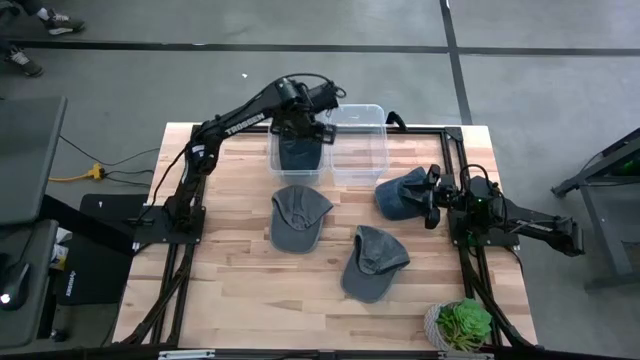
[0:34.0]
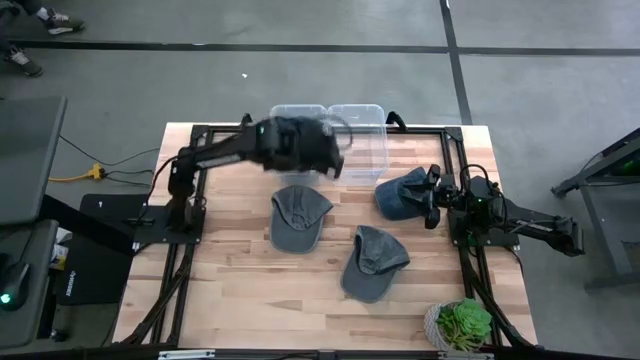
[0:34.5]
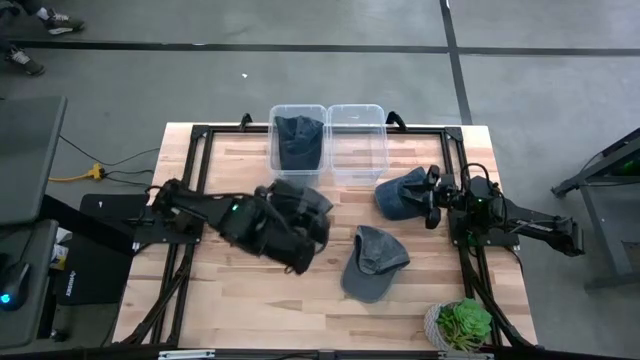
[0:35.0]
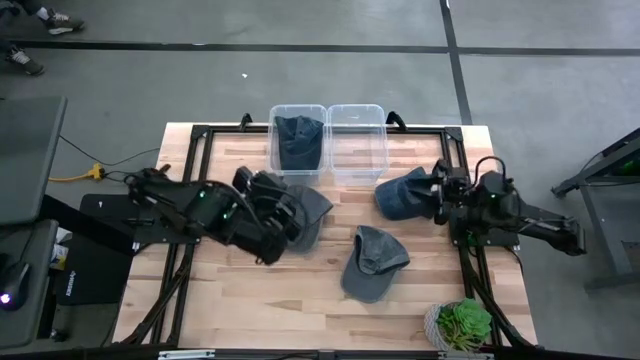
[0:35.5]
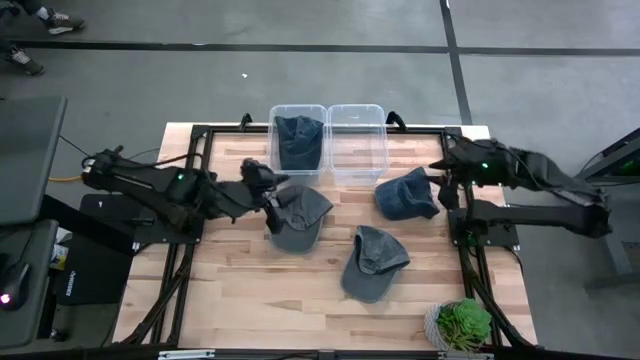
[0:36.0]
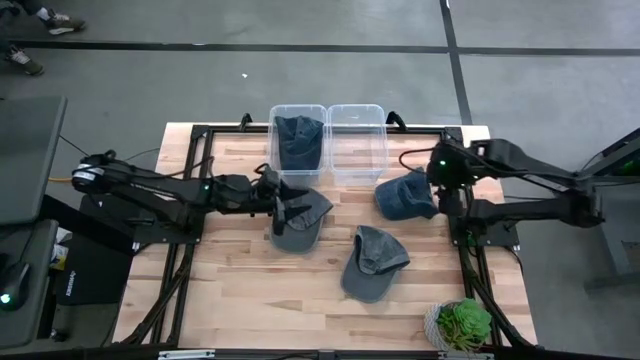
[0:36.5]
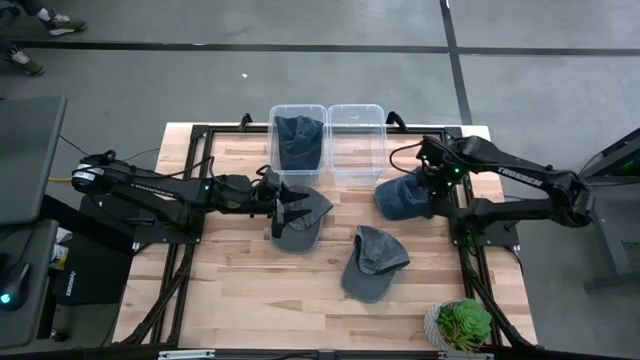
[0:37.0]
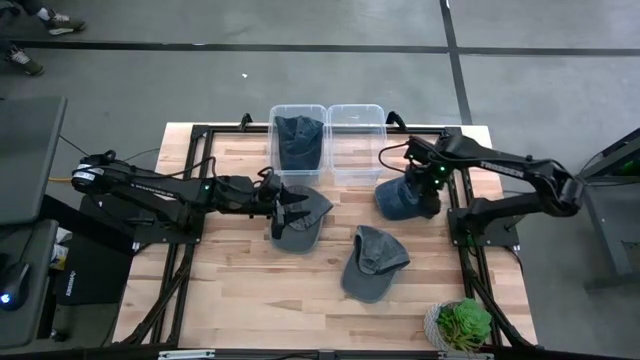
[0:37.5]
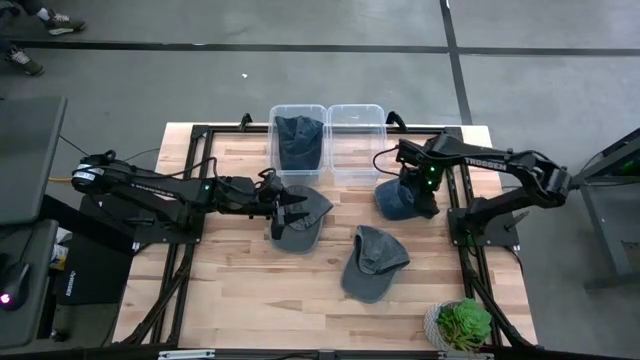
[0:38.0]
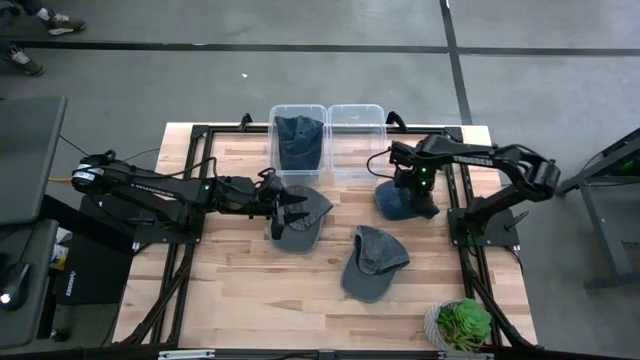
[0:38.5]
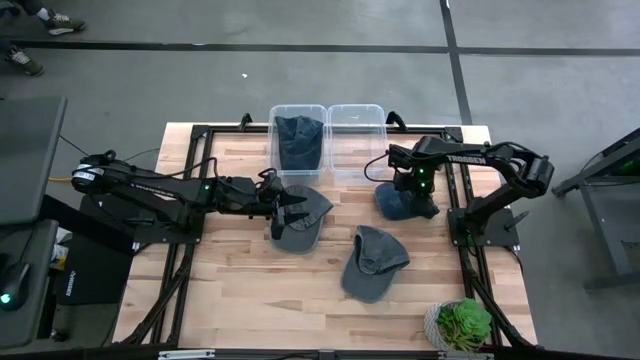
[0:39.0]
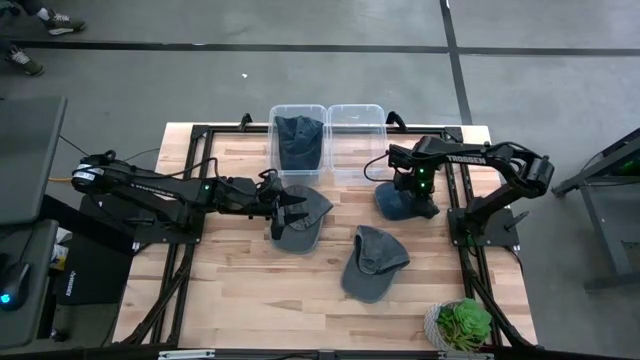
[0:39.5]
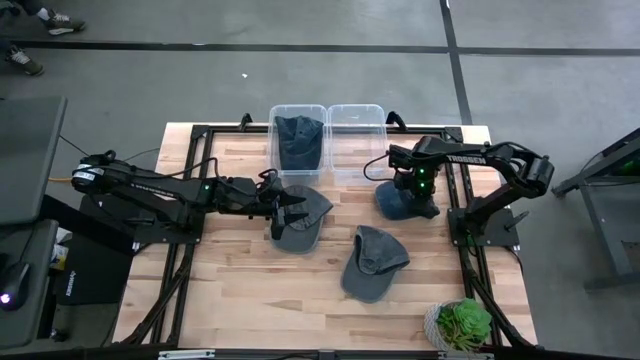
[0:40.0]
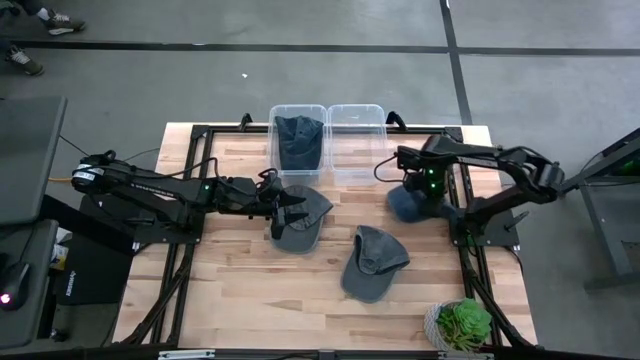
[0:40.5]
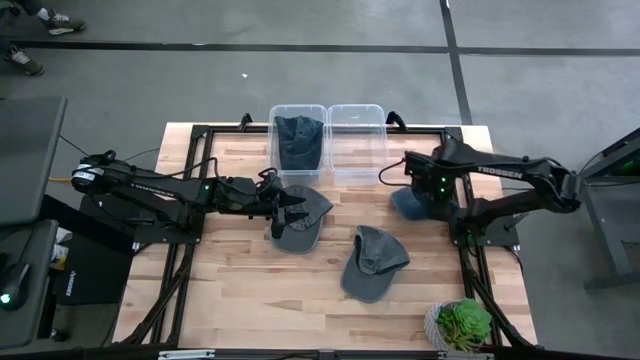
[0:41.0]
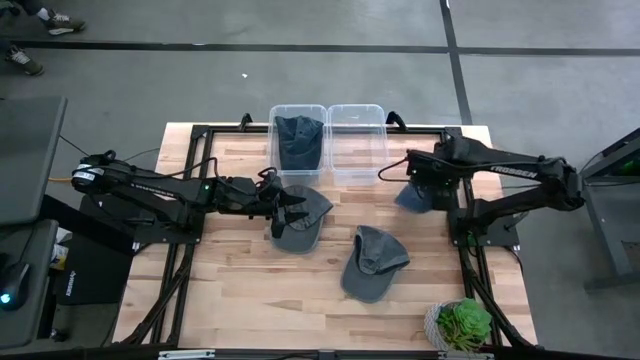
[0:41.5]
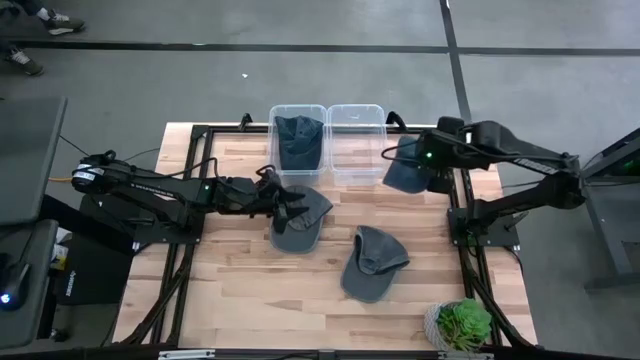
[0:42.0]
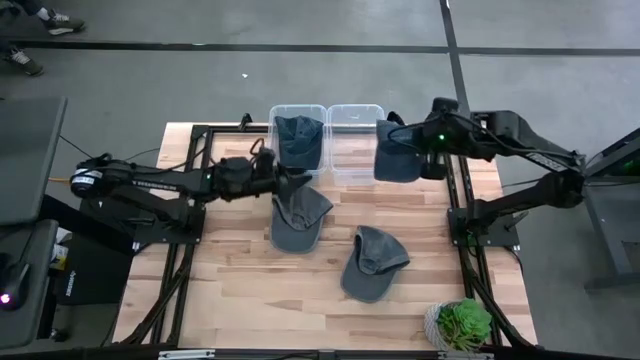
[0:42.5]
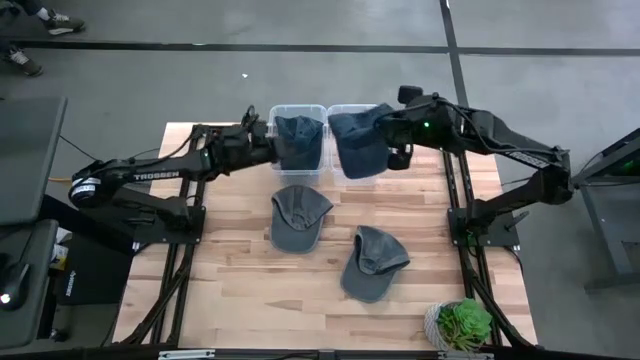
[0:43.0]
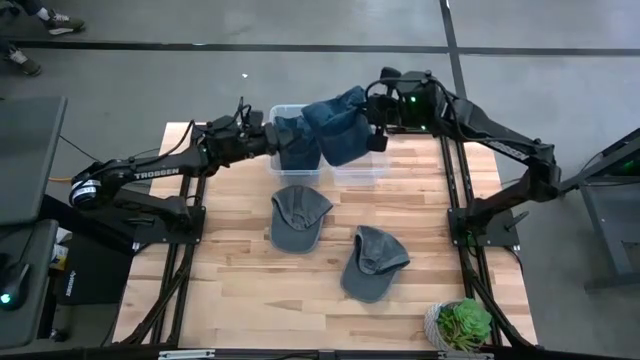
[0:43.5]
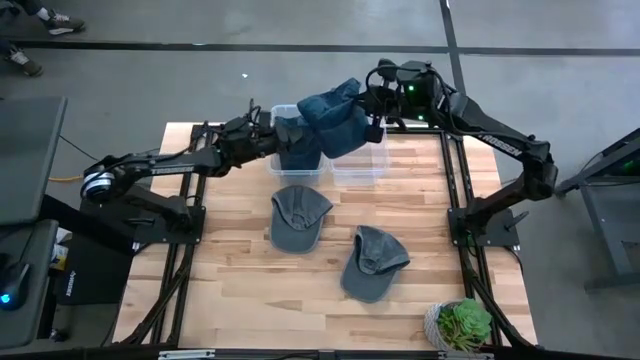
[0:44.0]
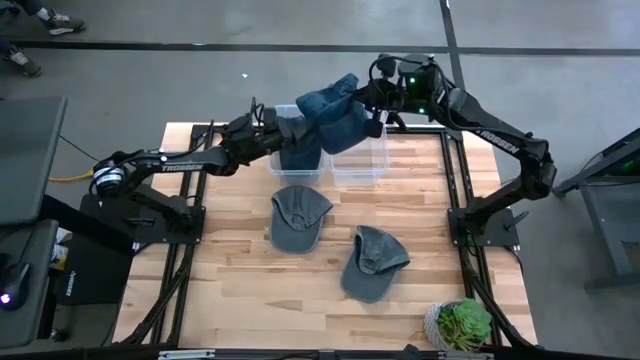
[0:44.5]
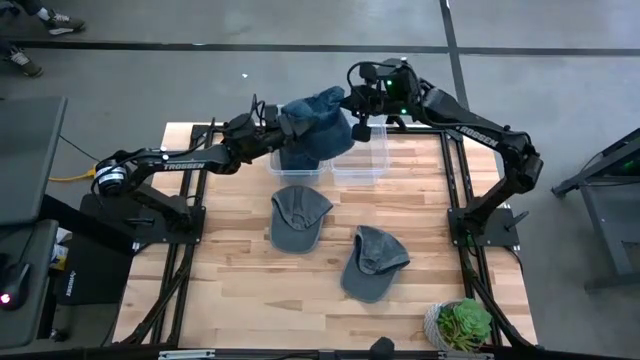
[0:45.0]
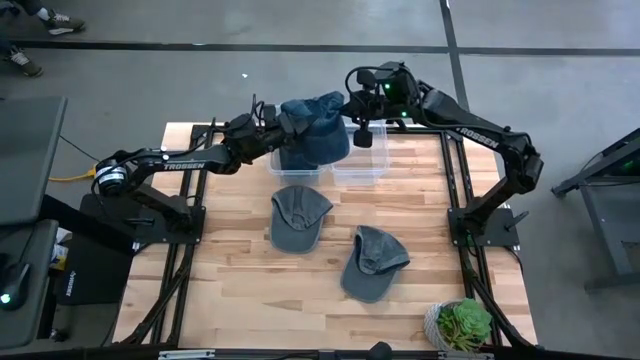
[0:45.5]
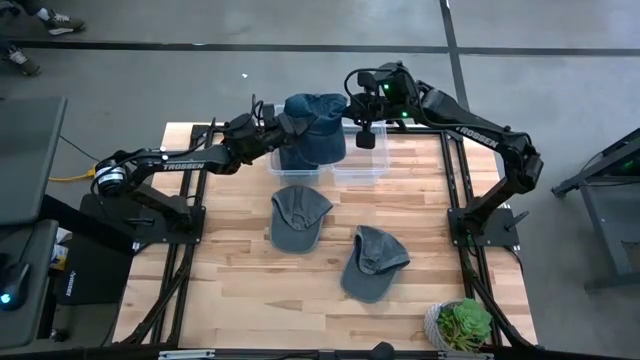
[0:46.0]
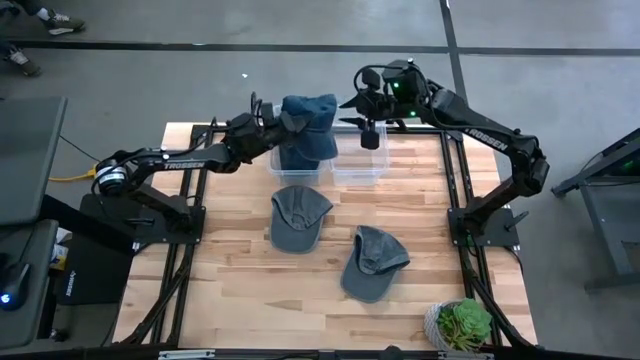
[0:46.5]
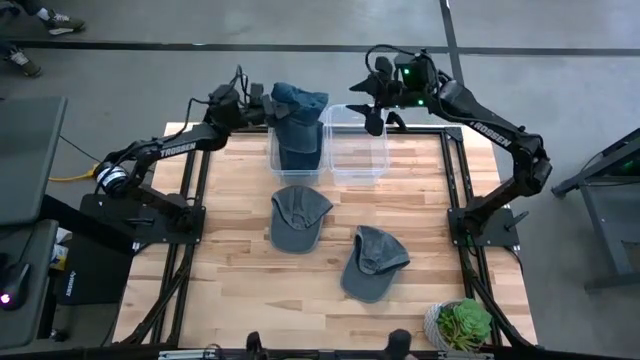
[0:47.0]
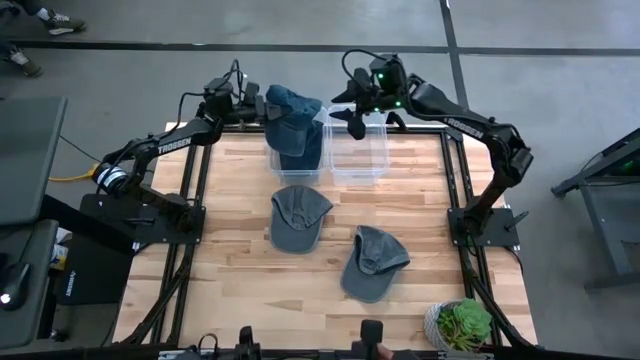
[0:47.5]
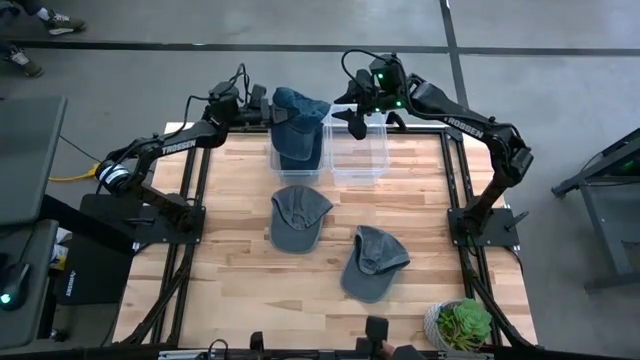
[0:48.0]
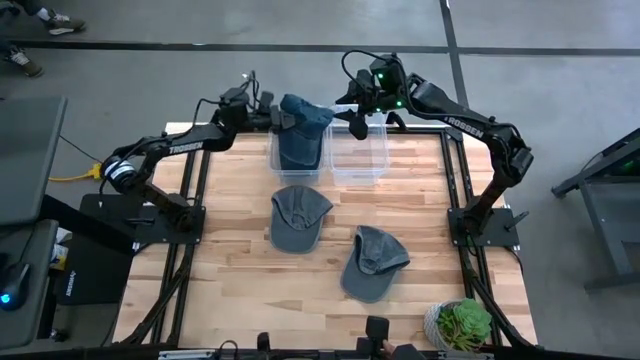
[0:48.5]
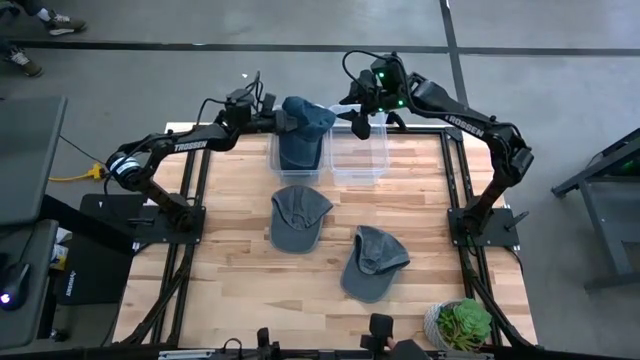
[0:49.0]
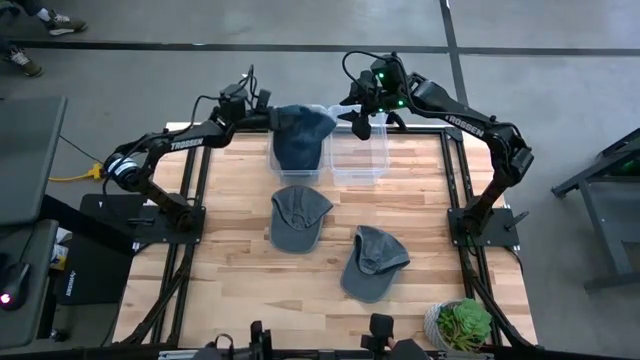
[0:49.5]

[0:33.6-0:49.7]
Task: Pick & Place hat
Put the blue cap into the left transparent bin

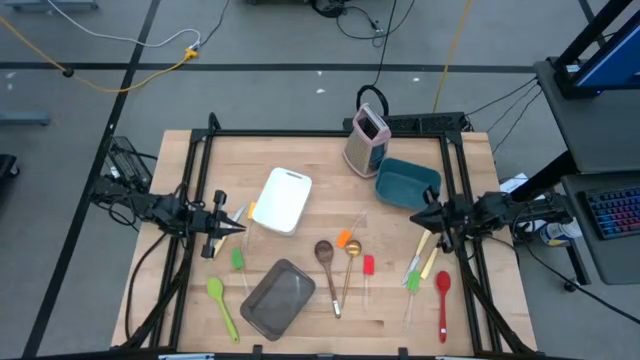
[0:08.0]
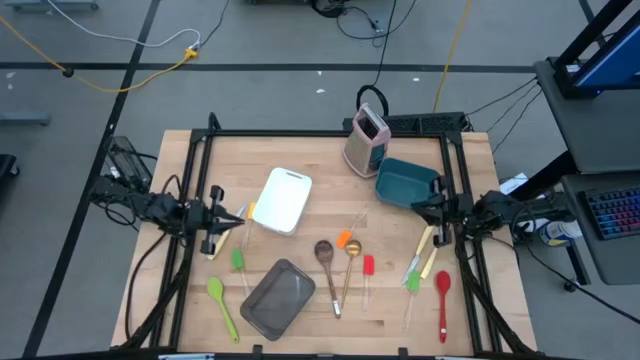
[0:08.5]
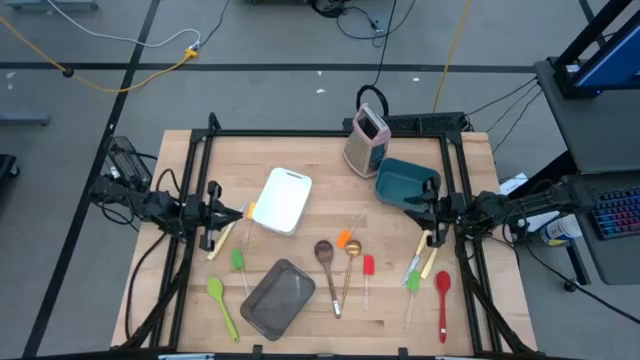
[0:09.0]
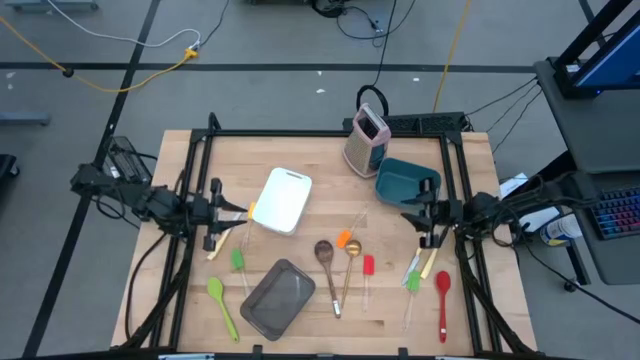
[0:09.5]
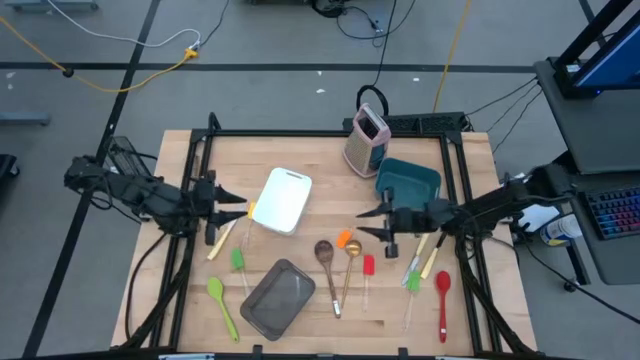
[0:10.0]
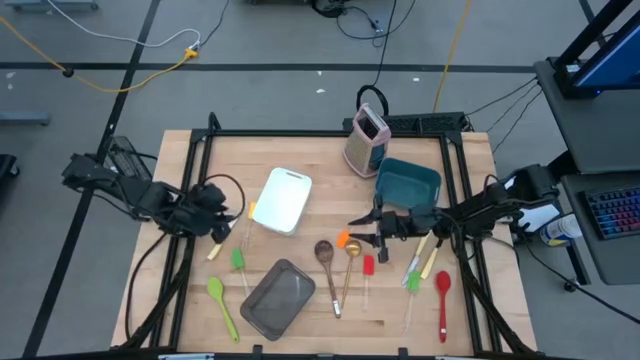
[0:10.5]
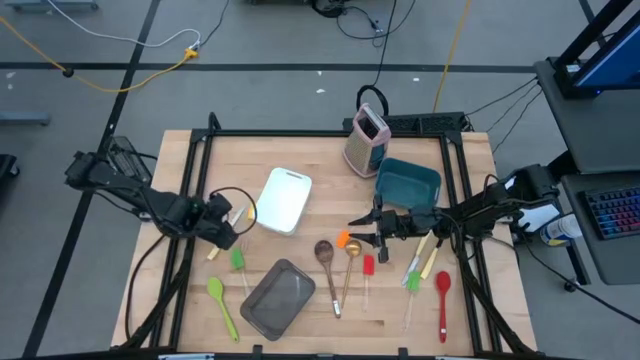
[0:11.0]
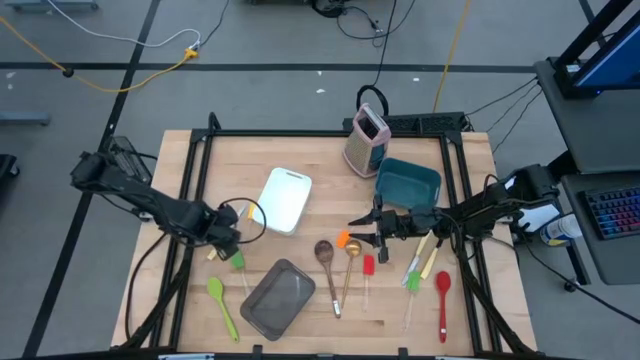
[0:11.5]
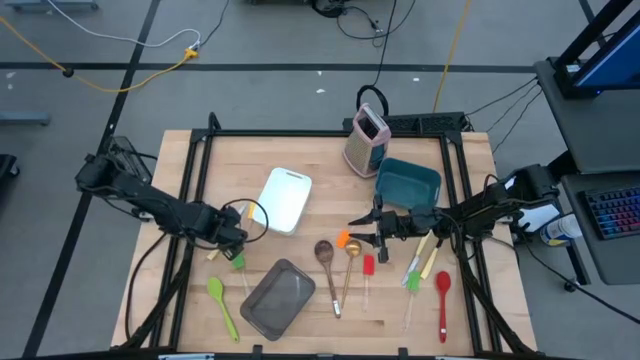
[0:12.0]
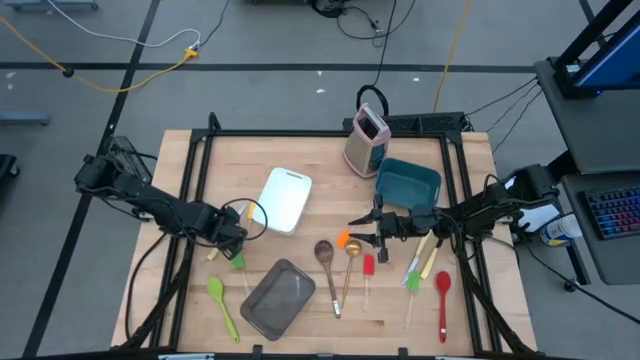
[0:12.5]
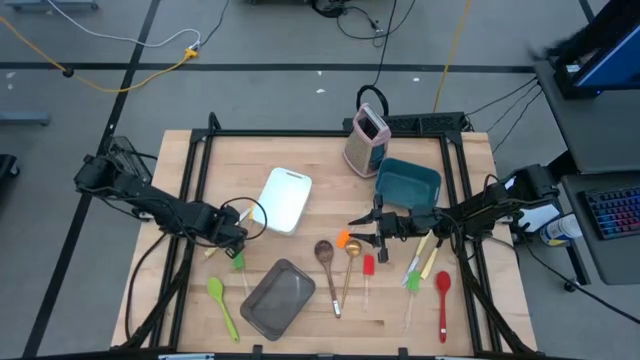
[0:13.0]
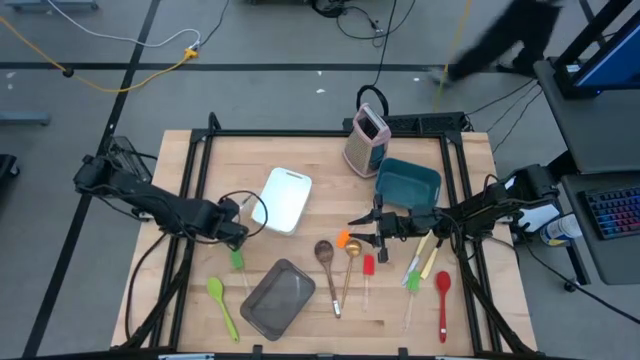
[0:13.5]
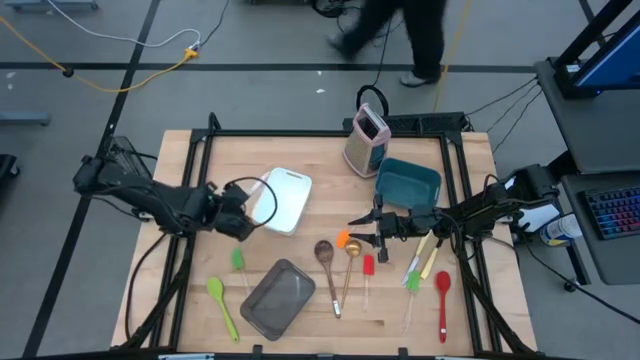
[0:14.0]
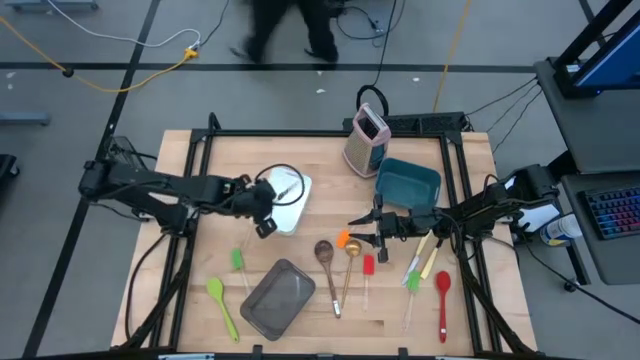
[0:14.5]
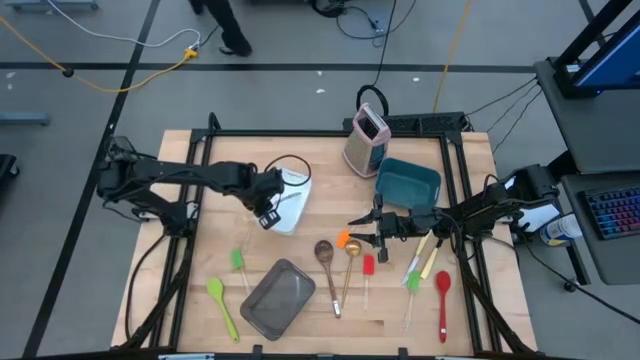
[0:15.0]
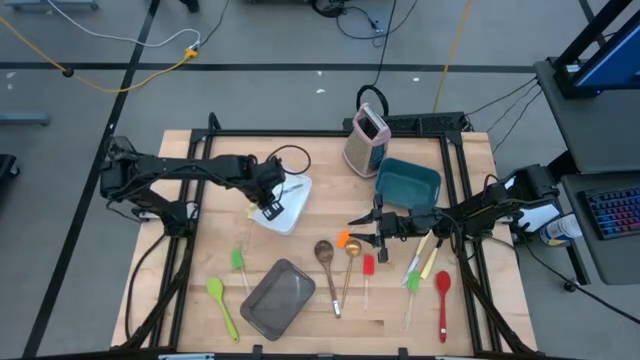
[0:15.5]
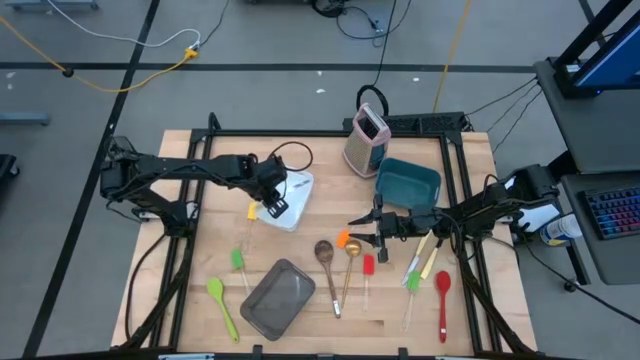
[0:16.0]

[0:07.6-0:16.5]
Task: Pick & Place Kitchen Items
Put the left white table knife into the white bin
